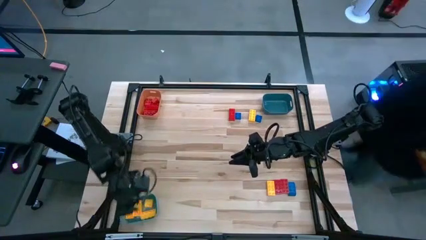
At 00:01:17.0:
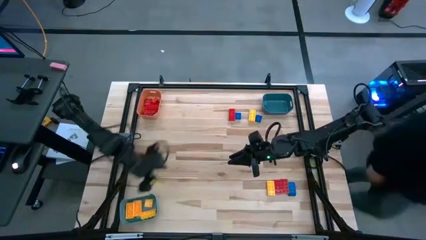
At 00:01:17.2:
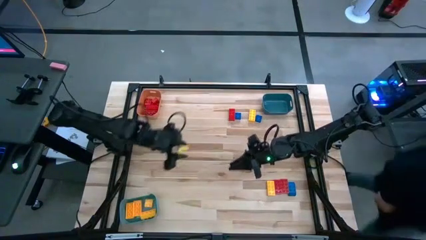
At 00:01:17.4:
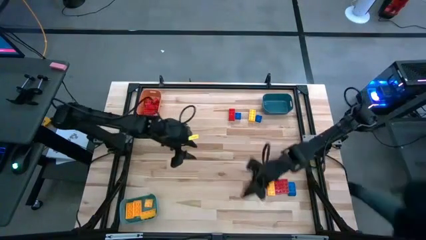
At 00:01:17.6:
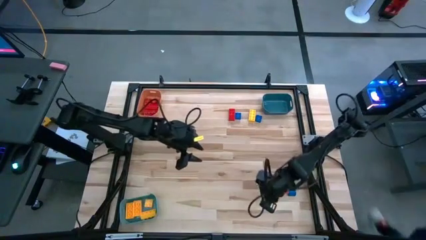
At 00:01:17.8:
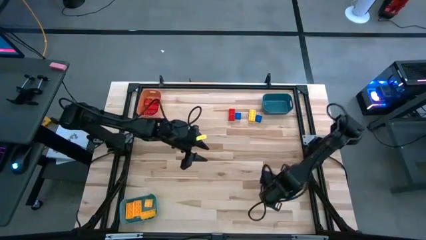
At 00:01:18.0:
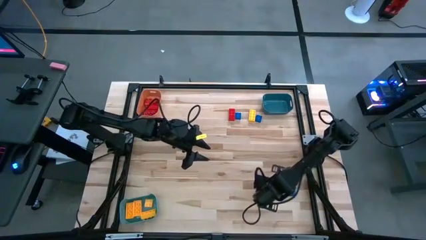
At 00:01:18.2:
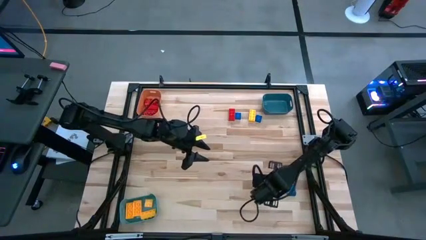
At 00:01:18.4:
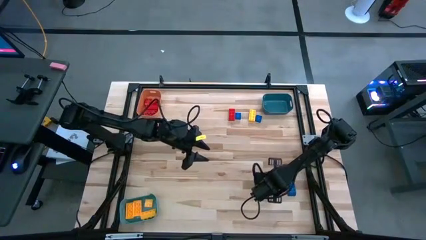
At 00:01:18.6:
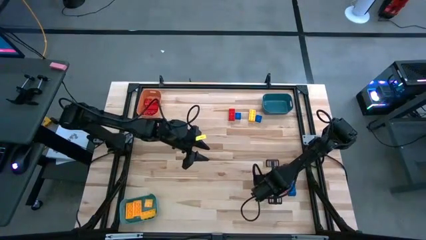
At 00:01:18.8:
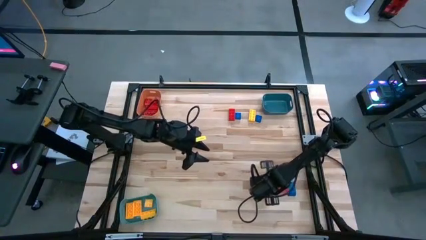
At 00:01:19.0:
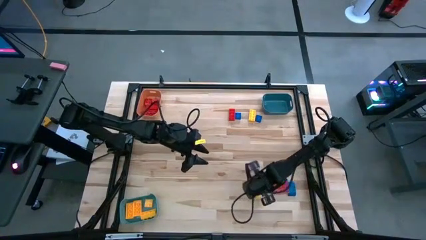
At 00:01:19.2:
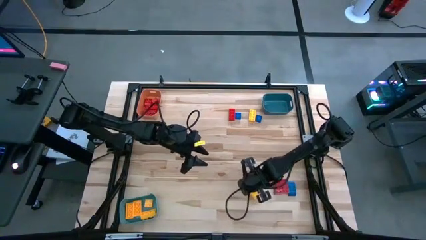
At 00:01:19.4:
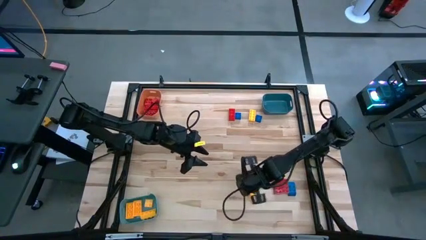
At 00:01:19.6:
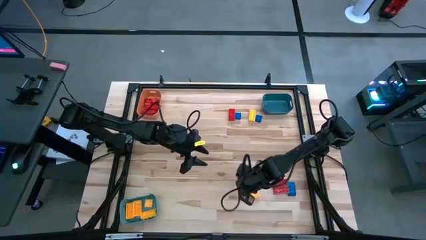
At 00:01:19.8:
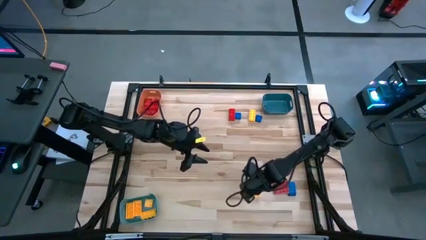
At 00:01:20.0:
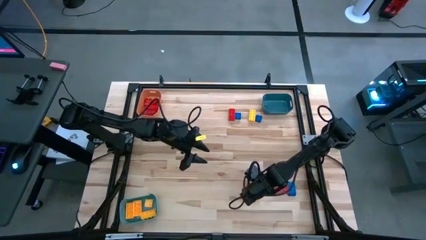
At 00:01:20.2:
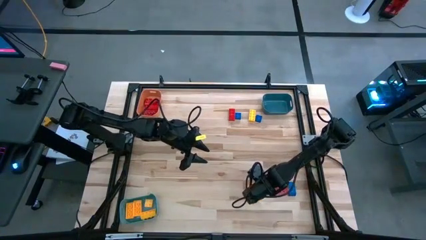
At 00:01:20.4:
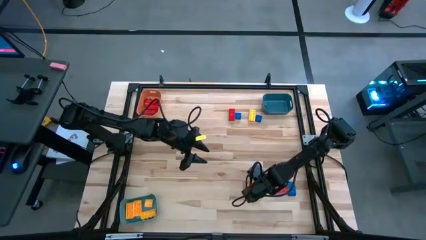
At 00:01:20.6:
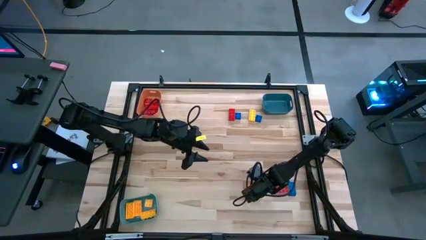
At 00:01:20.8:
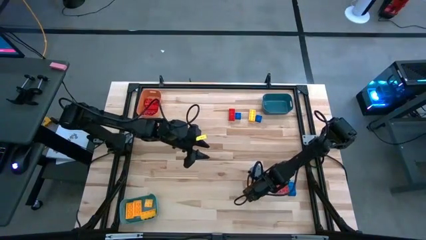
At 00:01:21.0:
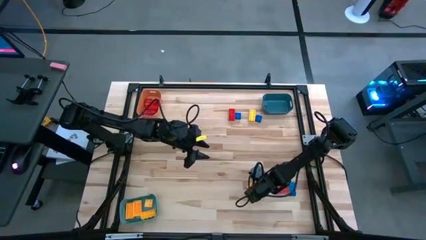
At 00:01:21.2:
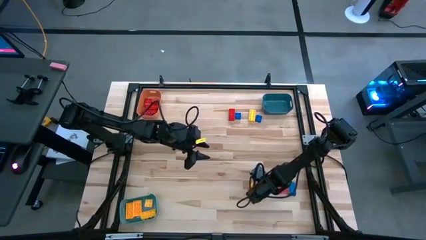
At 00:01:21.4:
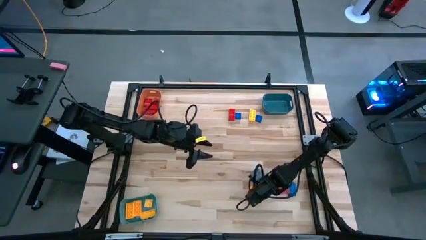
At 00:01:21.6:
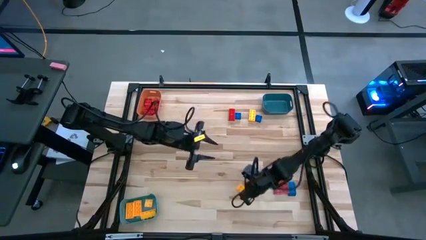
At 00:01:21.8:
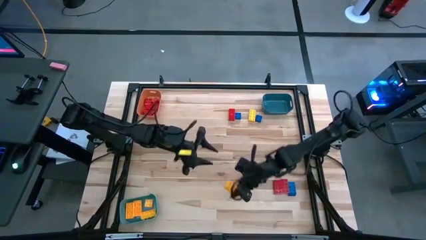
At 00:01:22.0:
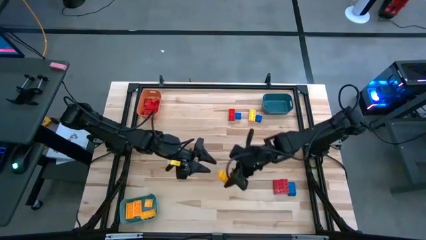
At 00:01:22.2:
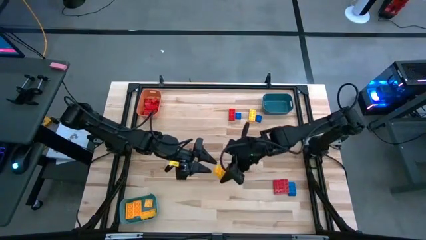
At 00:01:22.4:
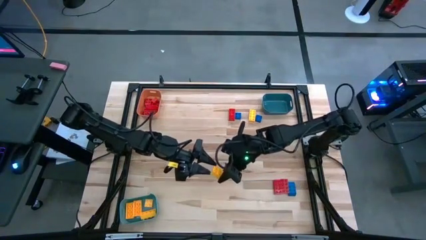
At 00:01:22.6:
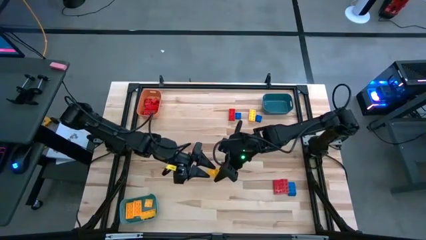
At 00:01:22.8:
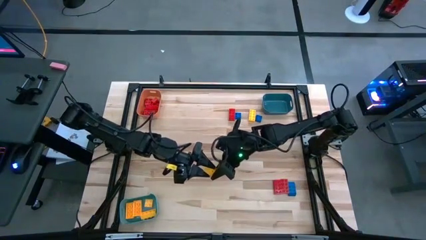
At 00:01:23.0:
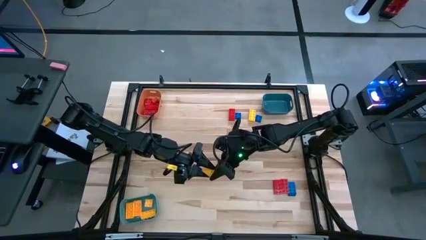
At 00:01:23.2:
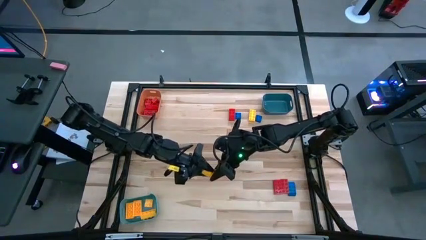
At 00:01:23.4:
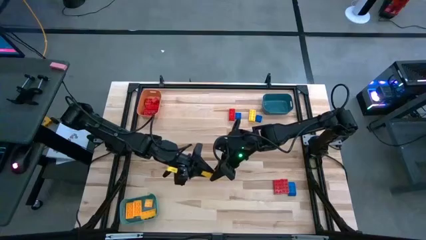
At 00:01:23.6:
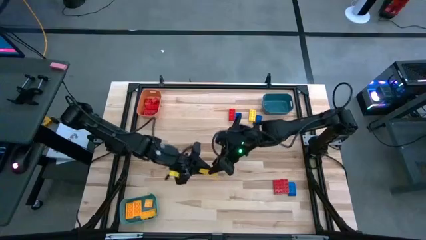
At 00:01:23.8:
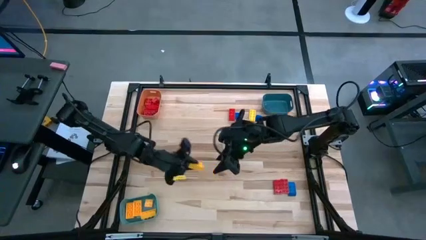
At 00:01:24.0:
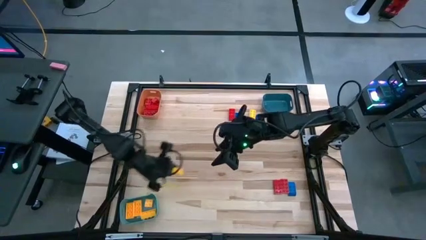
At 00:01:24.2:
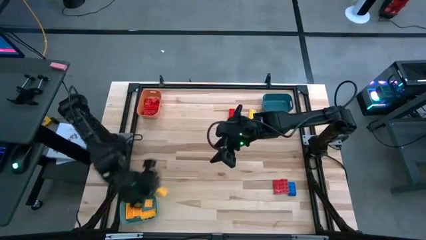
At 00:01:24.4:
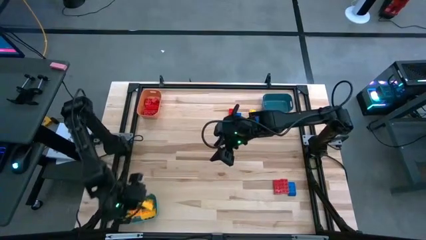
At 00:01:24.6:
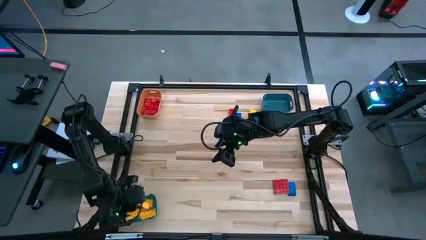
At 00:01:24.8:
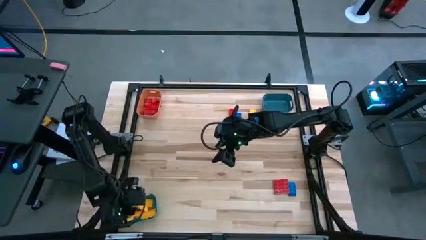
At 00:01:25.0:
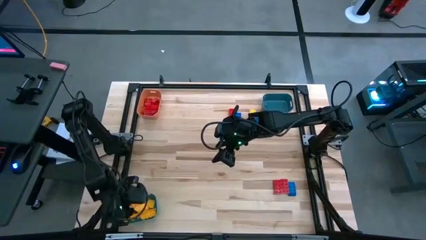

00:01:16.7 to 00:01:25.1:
Task: Sort blocks
Put the yellow game piece into the green bin

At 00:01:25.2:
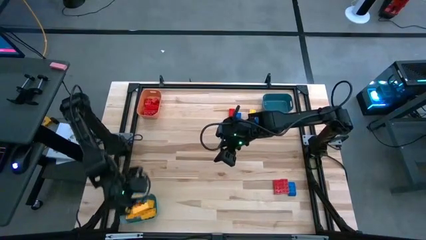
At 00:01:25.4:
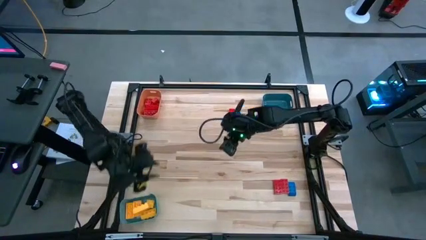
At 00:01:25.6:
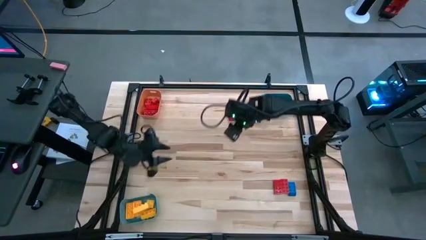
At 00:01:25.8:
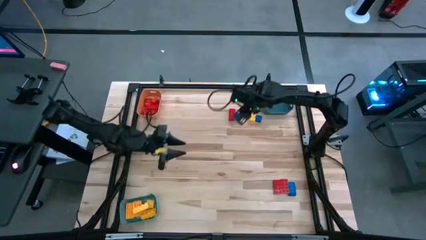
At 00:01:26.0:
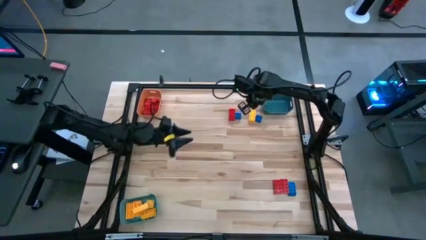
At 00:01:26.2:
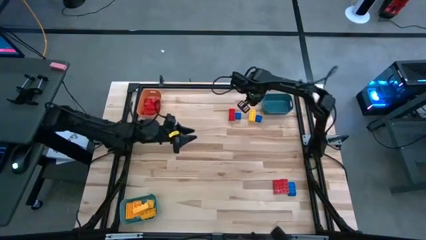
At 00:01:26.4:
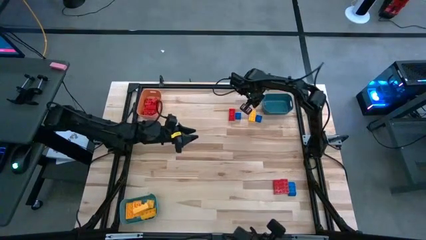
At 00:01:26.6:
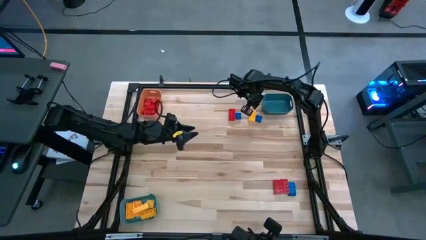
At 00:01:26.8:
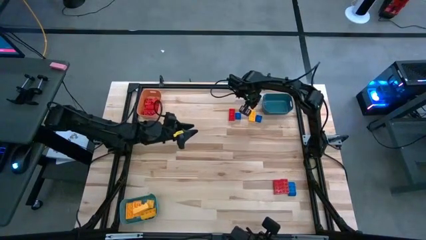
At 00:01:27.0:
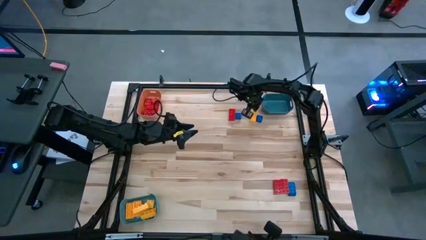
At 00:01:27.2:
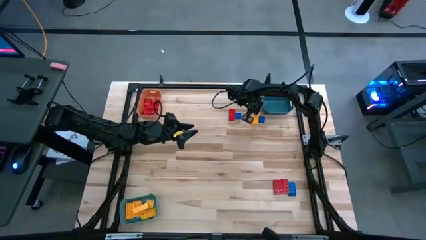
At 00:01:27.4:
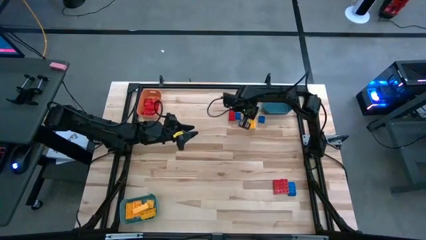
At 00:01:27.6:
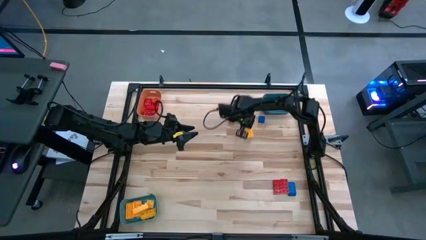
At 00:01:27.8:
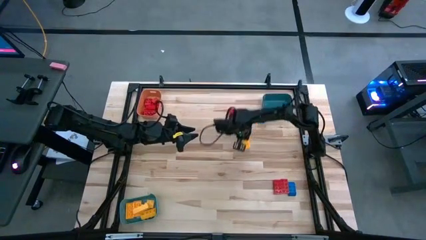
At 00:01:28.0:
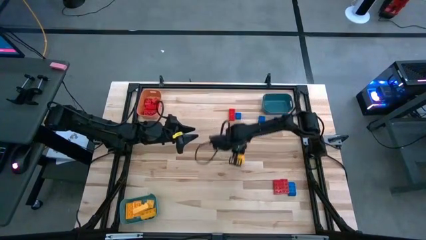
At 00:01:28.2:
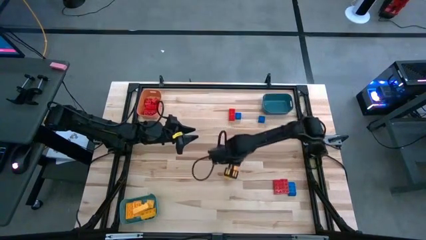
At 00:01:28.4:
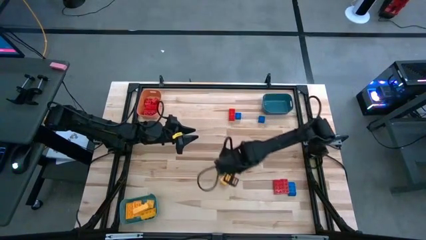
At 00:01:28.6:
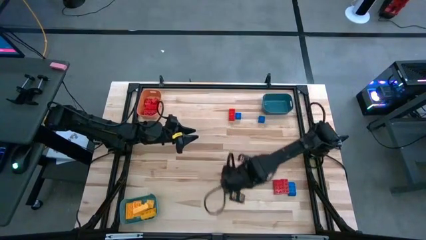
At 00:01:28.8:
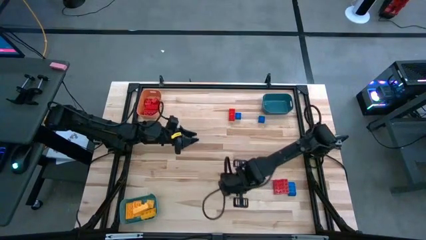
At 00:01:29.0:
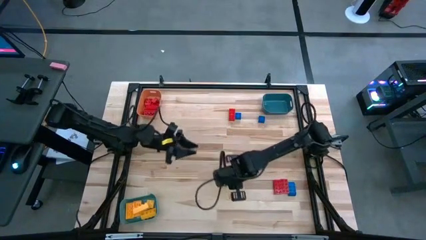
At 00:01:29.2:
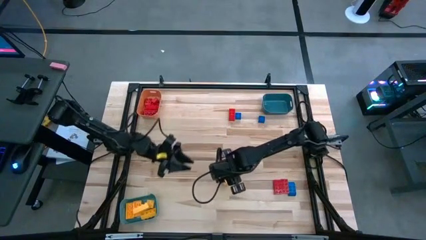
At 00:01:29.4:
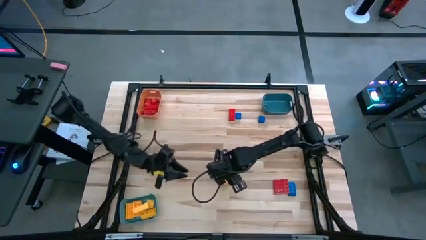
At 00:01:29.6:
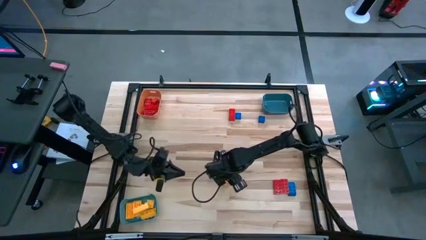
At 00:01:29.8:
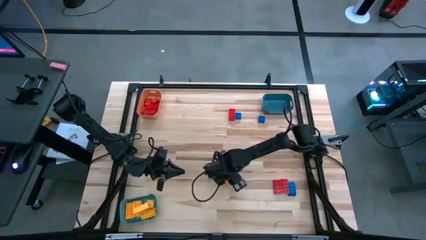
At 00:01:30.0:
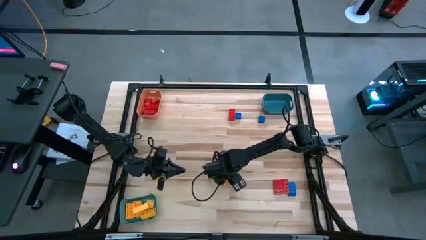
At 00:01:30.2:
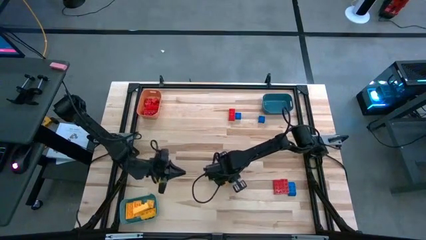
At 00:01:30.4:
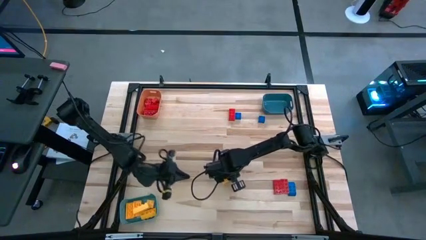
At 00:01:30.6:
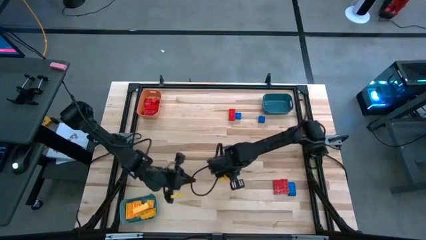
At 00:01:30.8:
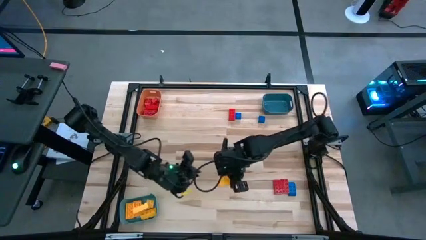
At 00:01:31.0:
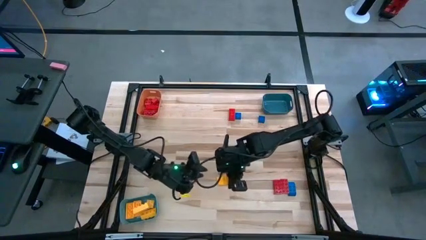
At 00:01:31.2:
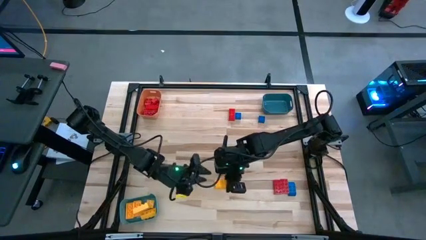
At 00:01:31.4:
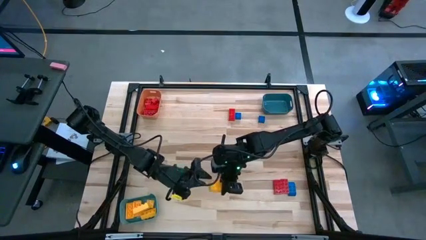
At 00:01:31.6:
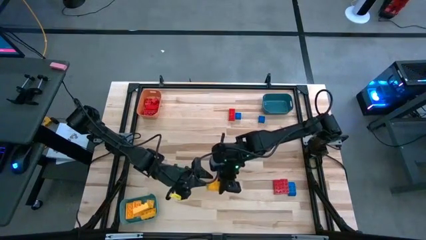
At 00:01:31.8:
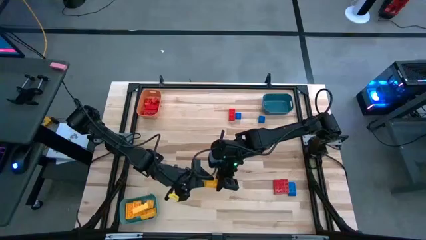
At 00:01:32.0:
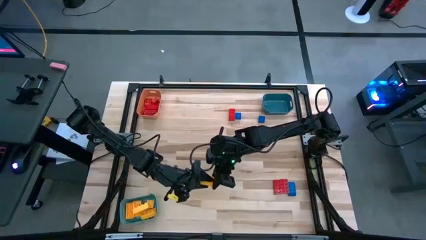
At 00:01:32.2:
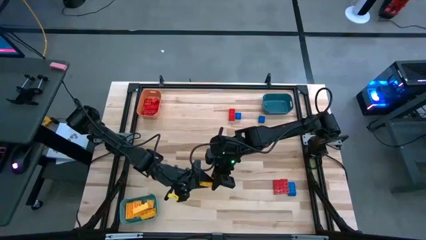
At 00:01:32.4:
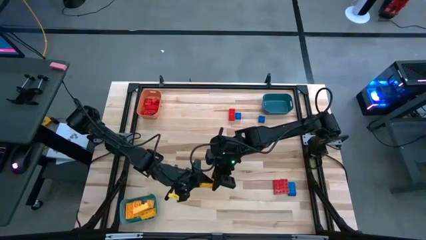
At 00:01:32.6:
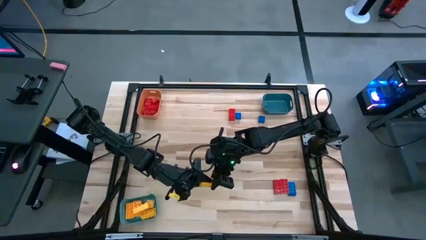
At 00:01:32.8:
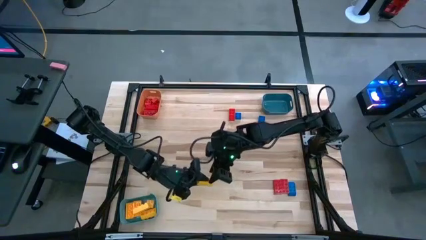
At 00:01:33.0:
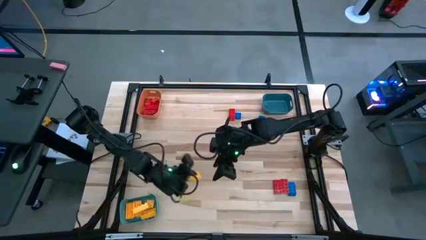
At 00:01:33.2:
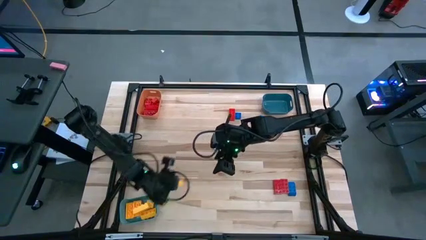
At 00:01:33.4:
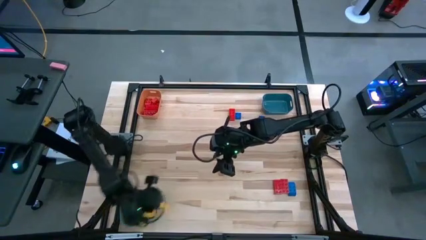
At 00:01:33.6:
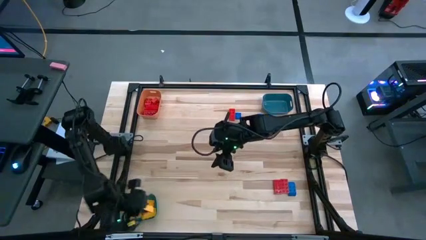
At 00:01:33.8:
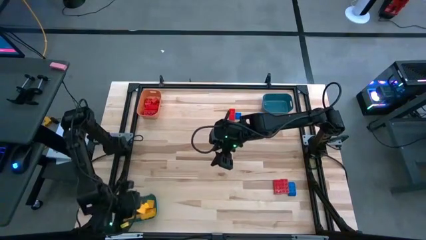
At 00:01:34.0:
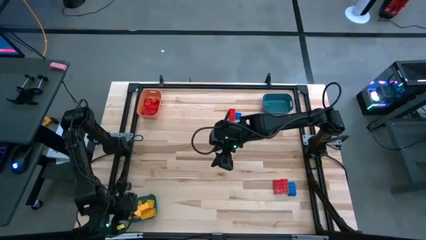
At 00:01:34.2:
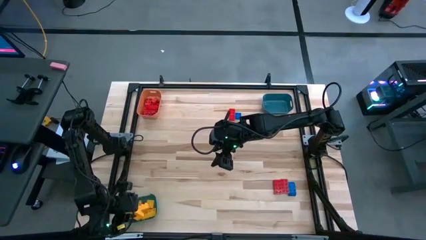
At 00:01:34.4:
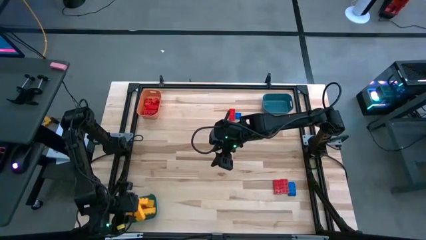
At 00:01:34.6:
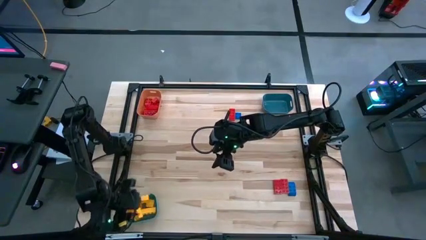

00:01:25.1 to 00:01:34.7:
Put the yellow game piece into the green bin
